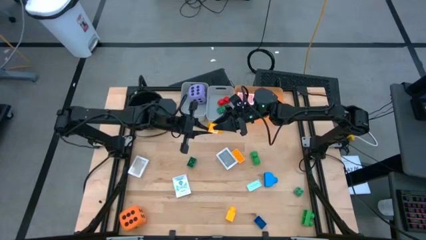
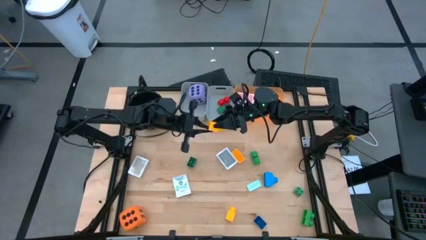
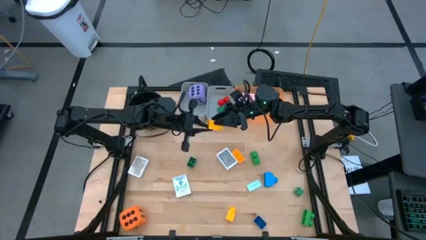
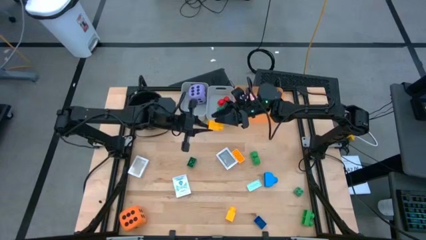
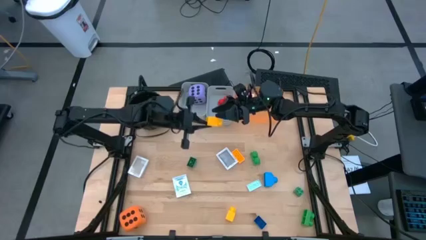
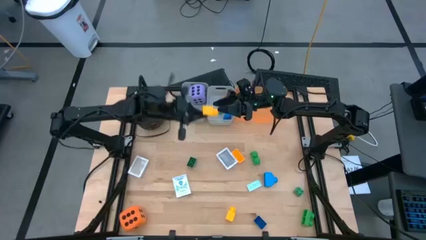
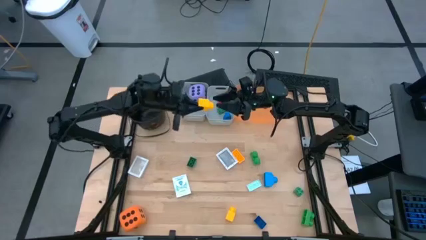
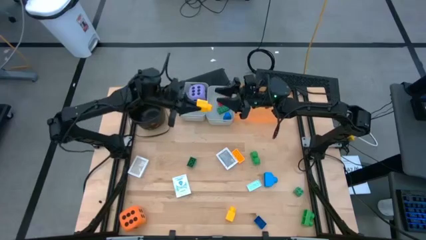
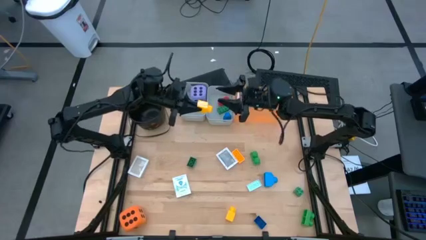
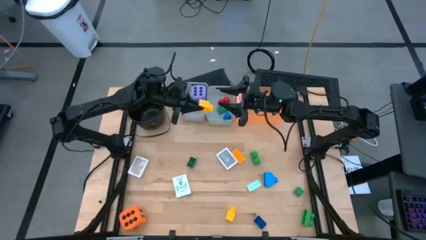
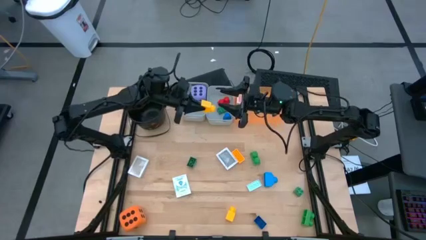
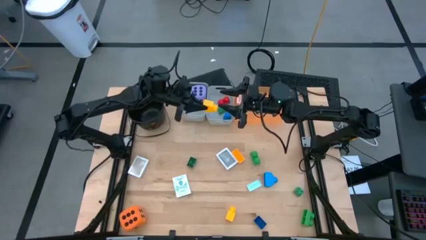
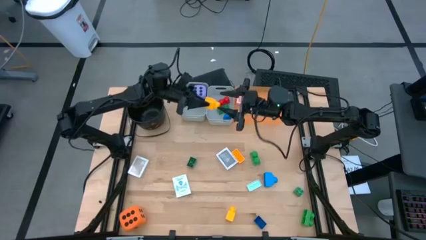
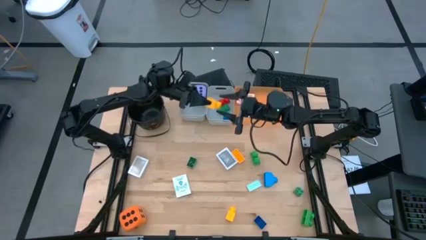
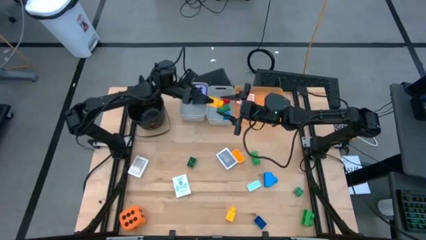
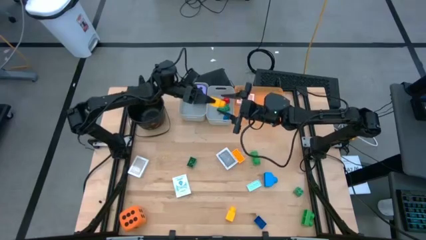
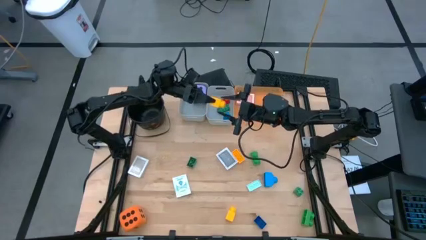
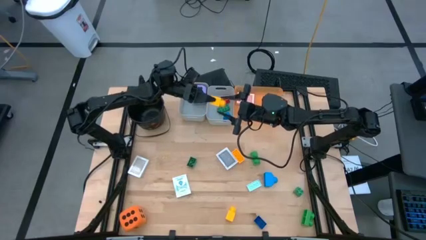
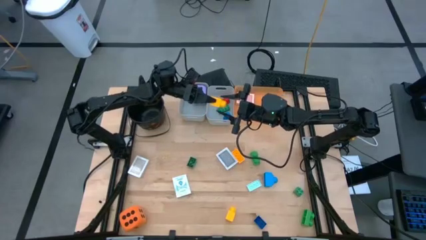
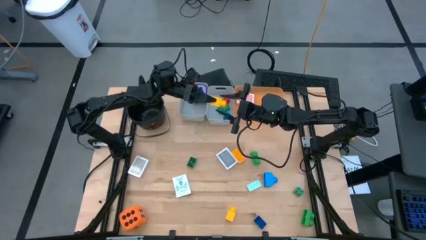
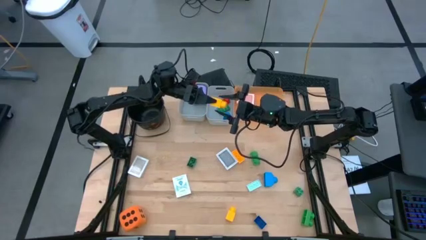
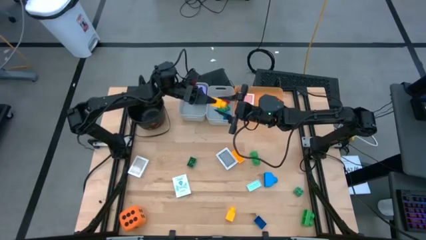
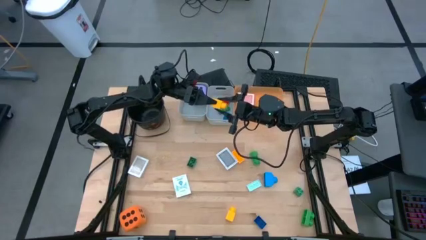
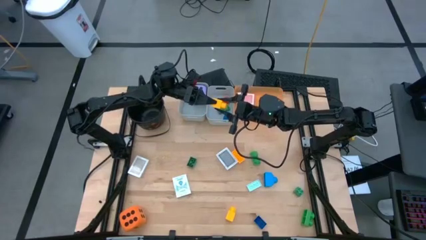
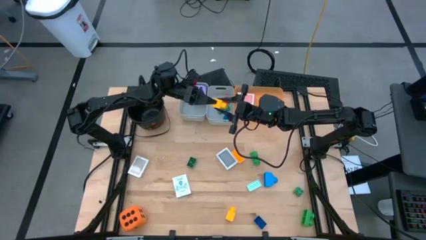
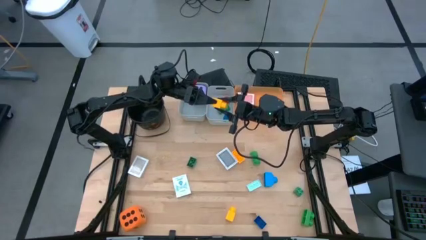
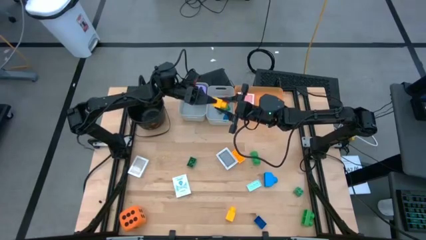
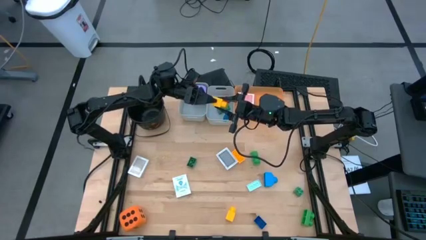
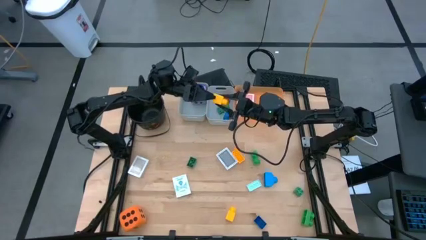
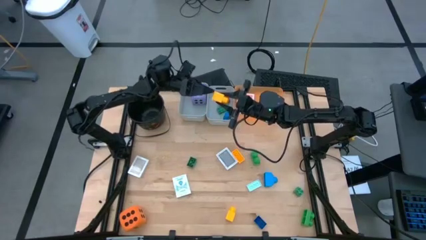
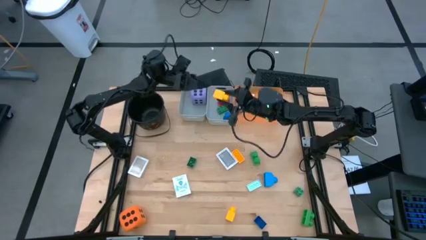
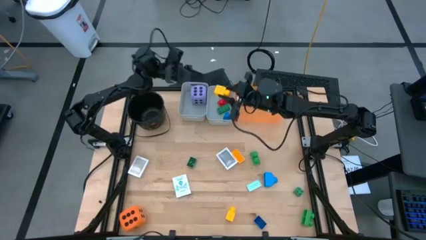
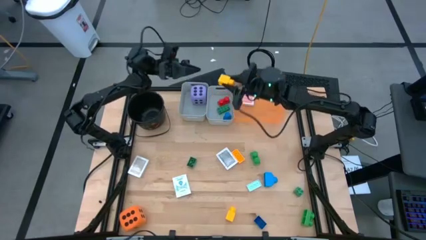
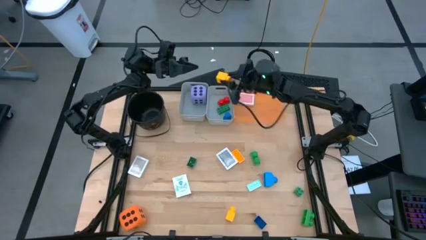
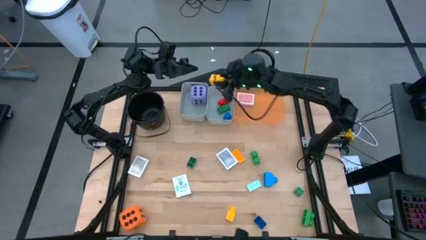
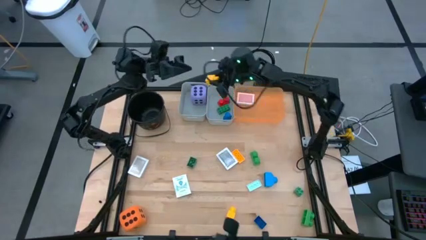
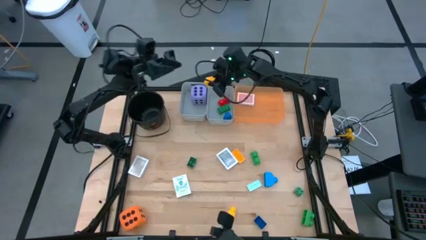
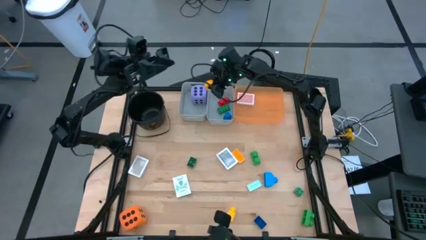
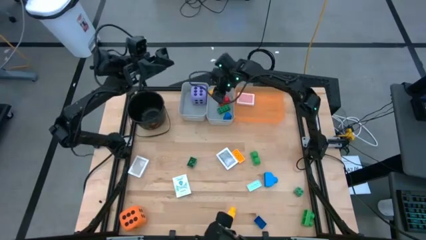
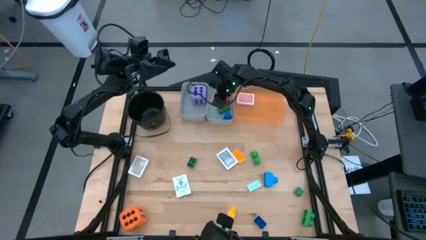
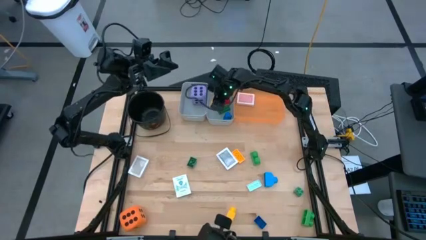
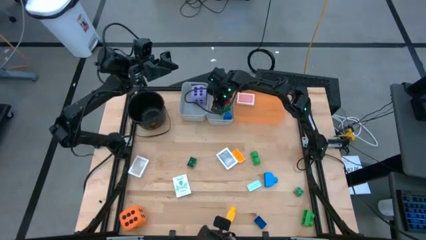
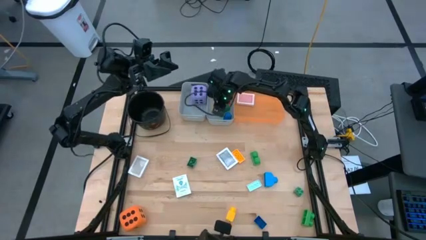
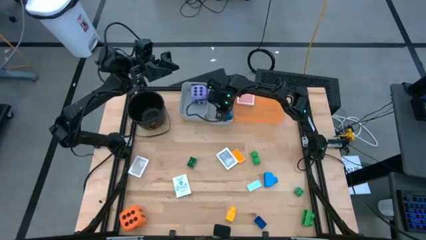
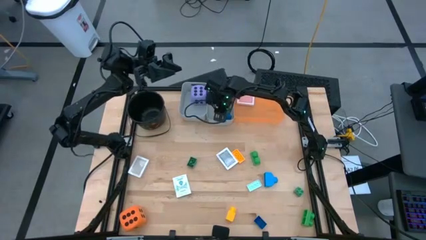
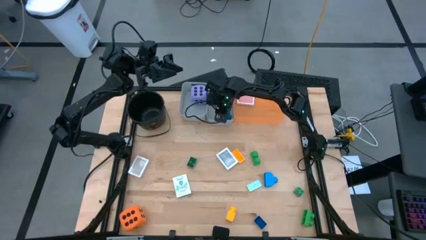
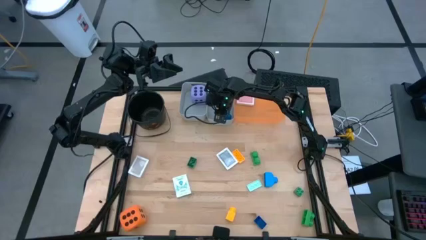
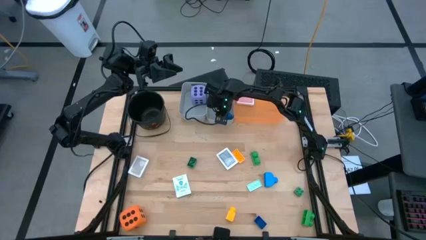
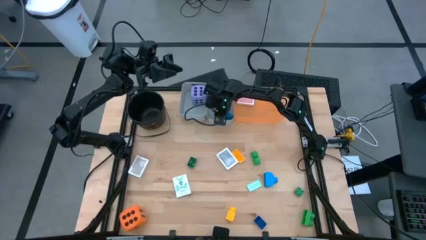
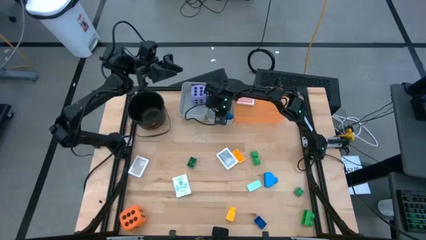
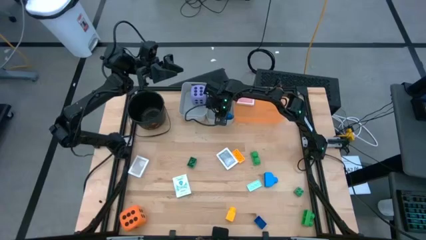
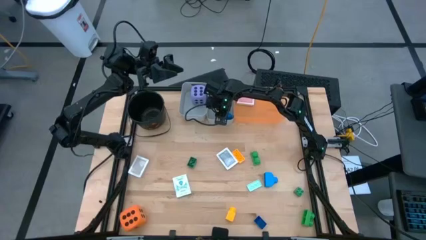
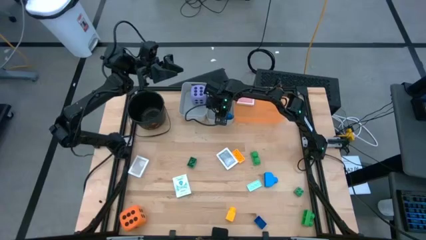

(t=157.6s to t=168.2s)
Task: Pick & Place Toys
Put the yellow gamepiece into the right gray bin
